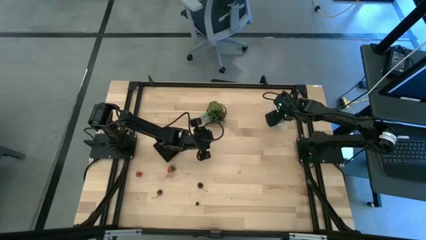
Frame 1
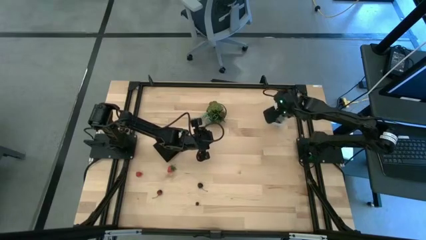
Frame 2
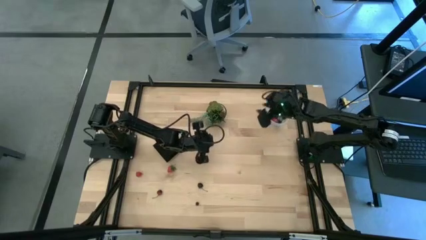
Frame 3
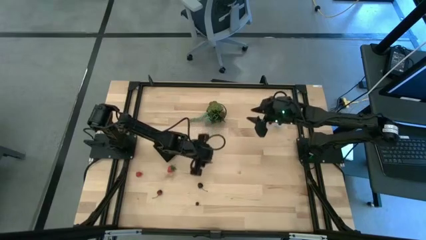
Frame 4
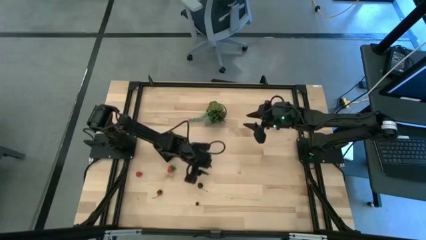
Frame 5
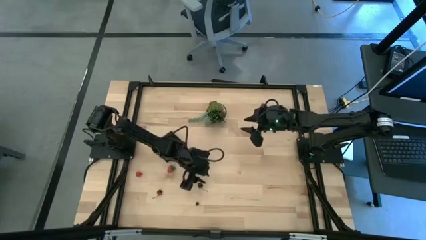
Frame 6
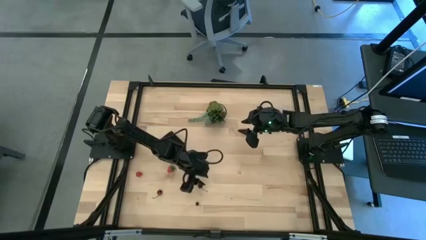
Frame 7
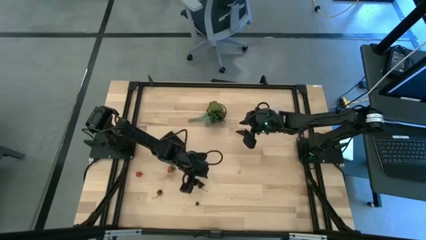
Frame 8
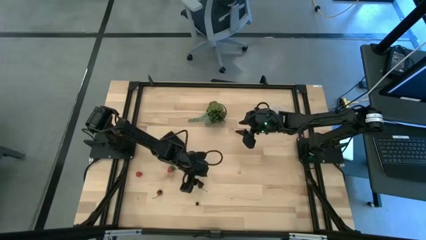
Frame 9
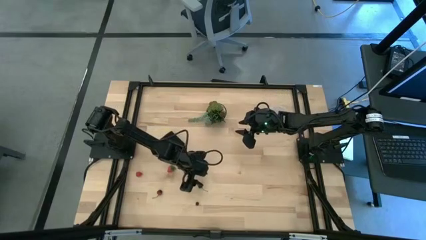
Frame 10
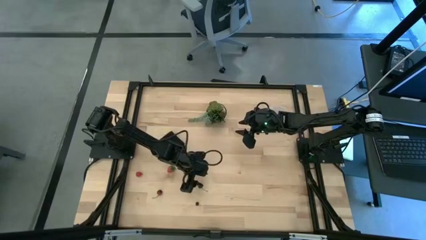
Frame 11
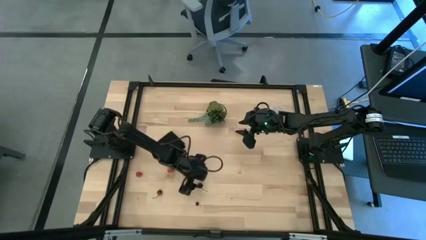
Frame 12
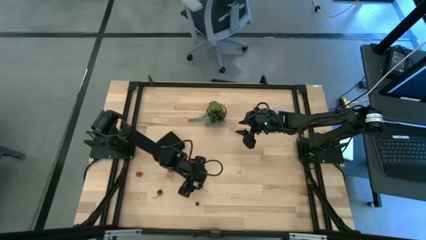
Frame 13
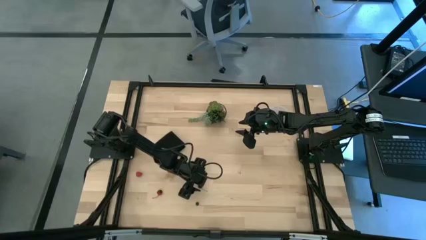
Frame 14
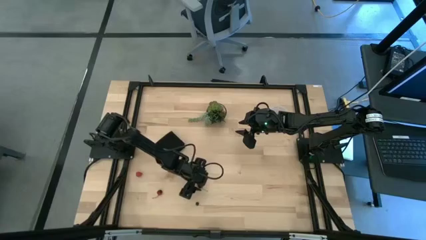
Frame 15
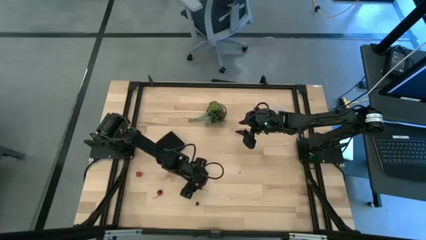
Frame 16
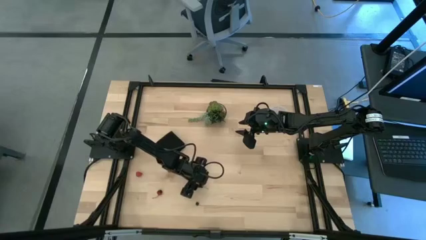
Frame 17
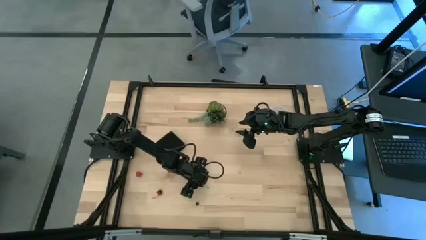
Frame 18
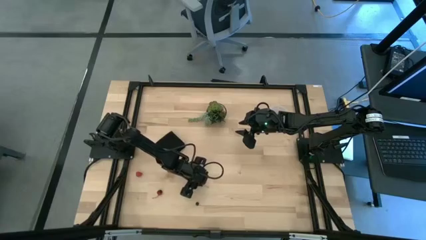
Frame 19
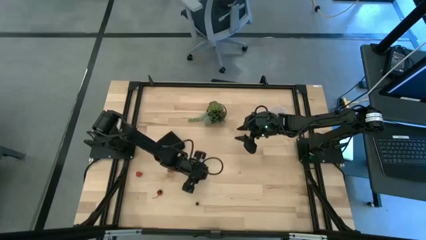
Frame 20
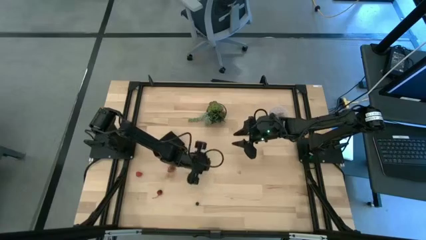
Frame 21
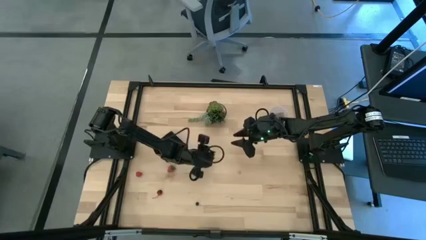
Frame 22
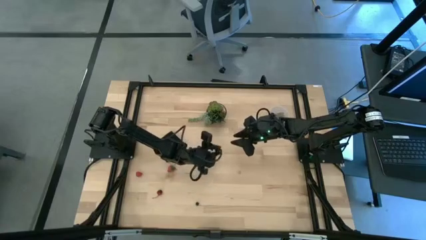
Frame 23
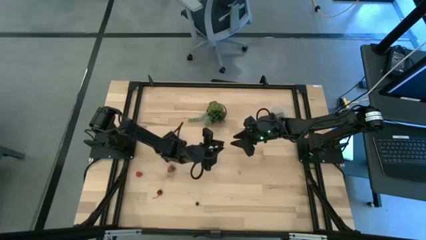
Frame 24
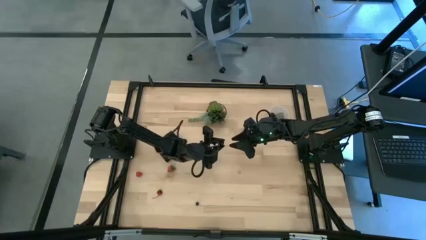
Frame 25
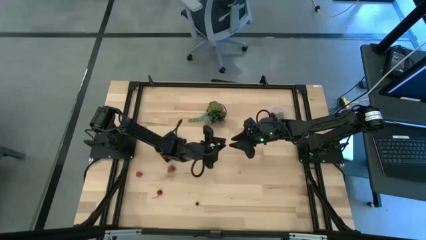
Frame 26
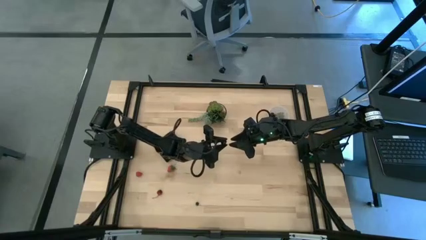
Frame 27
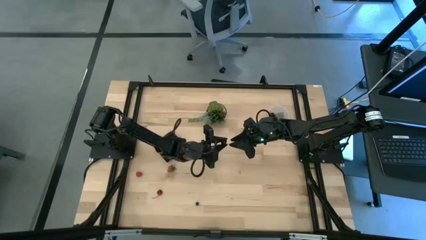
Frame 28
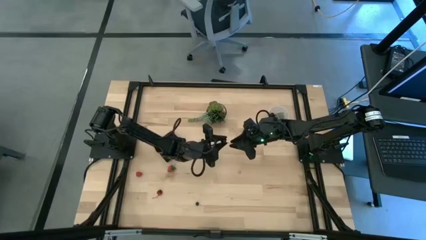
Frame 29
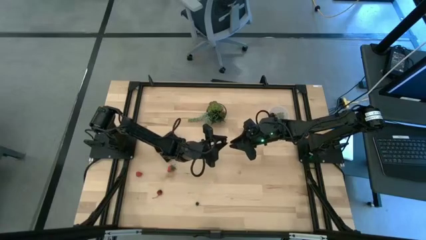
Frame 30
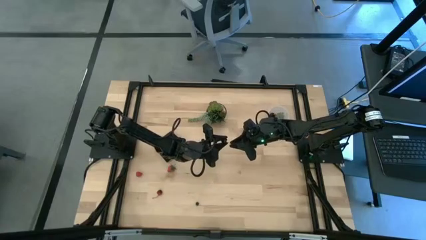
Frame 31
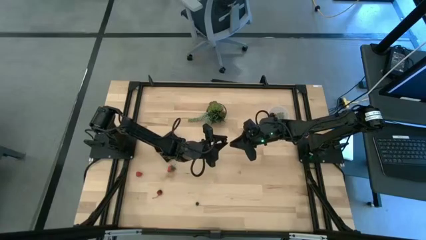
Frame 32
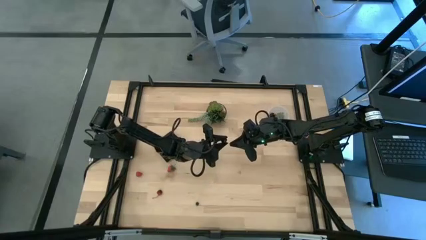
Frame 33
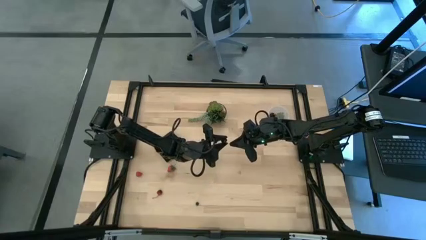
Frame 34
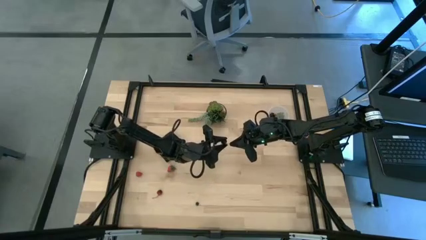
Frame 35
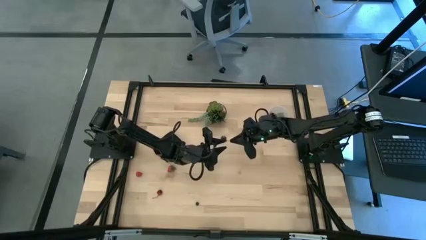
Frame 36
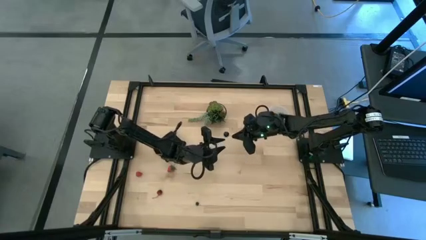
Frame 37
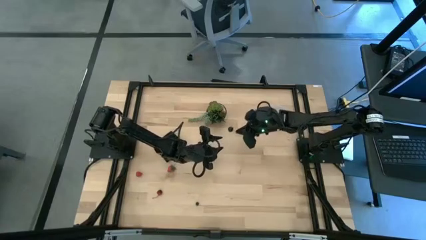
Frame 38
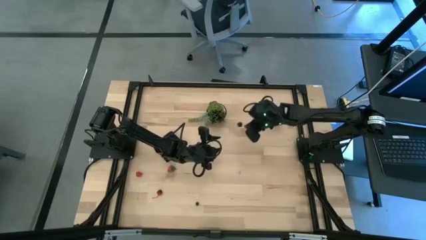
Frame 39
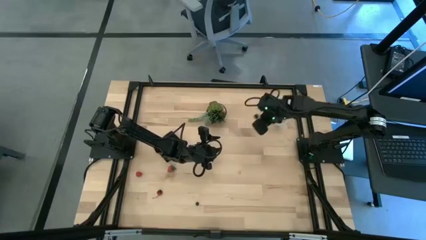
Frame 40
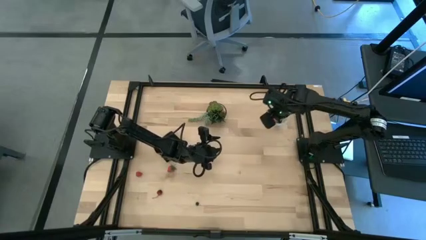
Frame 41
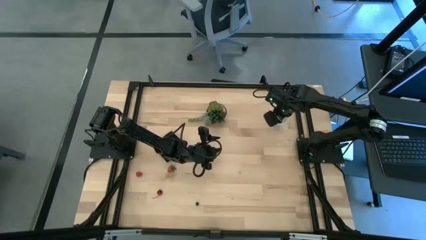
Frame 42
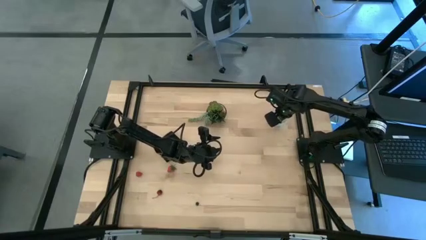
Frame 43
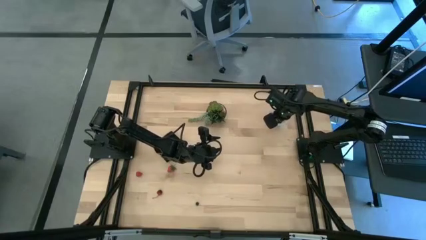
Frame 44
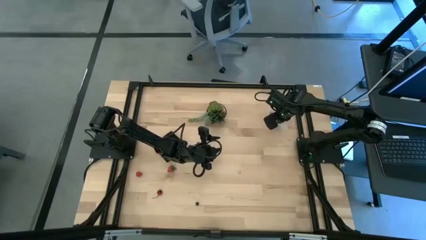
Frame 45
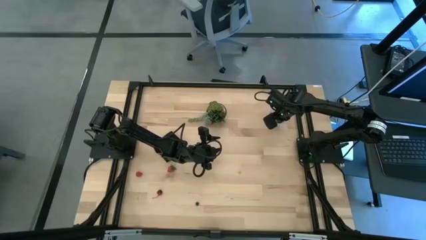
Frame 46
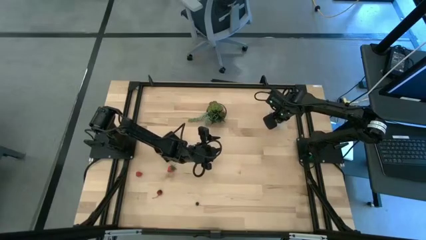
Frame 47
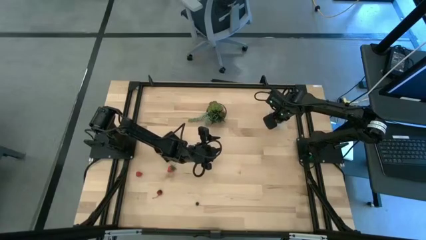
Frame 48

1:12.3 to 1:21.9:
Task: Pick and placing Produce into tupperware
Put the black cherry into the bin

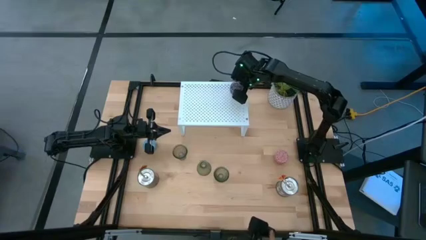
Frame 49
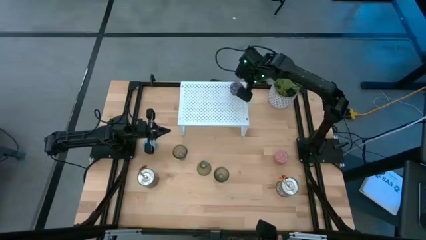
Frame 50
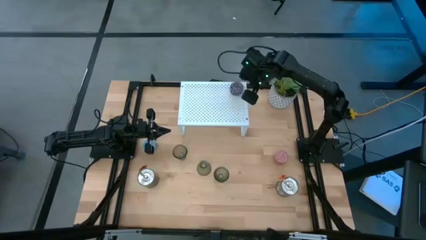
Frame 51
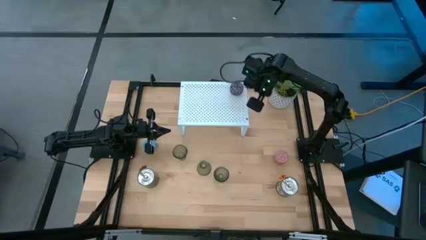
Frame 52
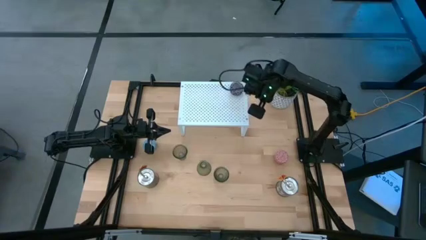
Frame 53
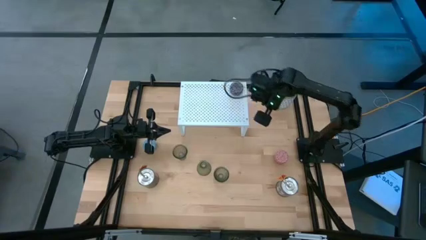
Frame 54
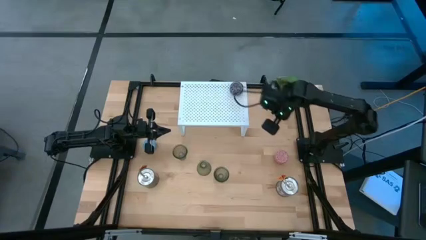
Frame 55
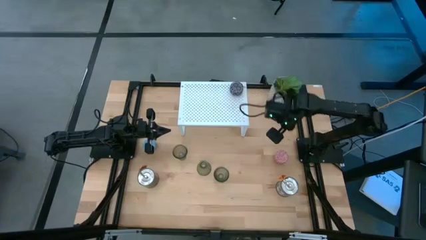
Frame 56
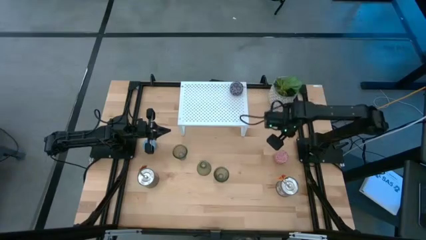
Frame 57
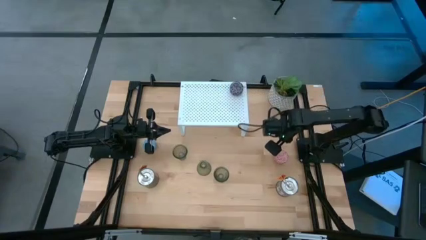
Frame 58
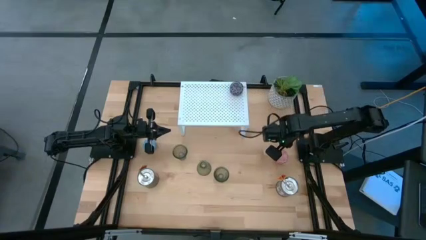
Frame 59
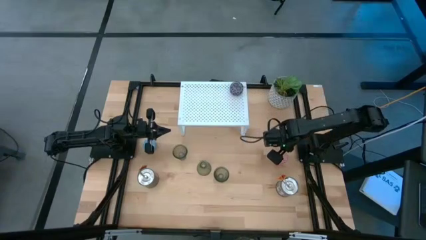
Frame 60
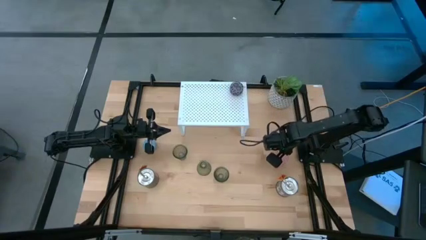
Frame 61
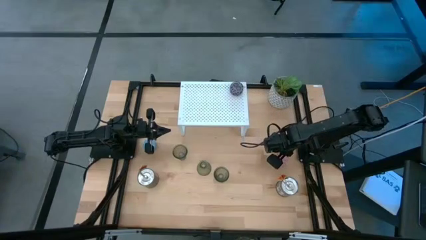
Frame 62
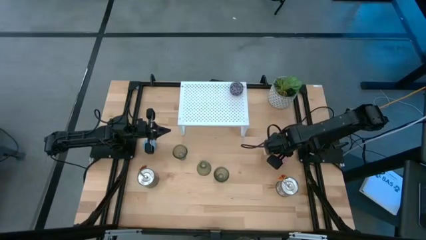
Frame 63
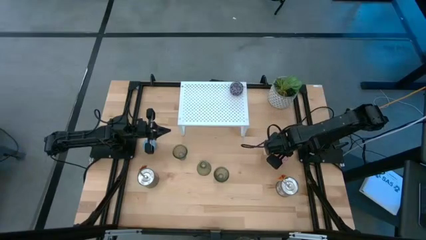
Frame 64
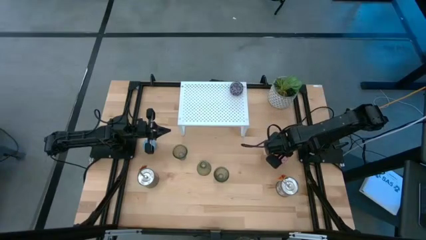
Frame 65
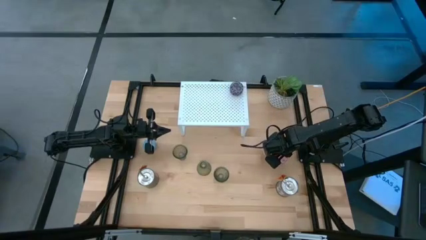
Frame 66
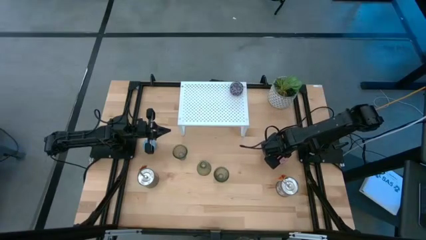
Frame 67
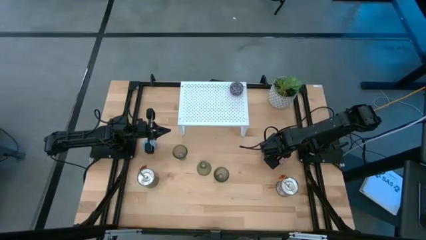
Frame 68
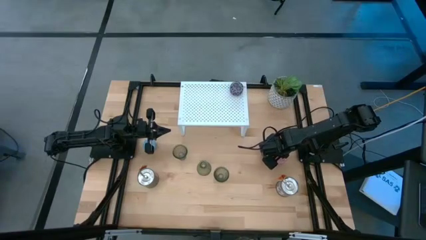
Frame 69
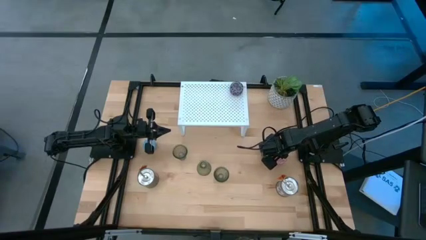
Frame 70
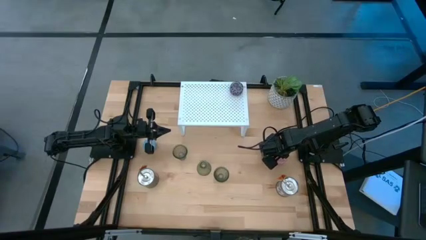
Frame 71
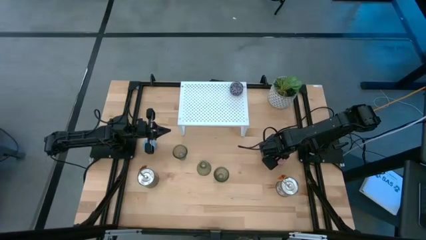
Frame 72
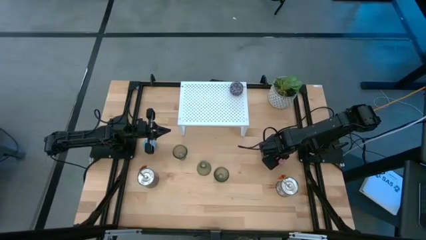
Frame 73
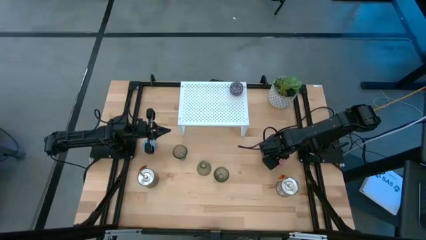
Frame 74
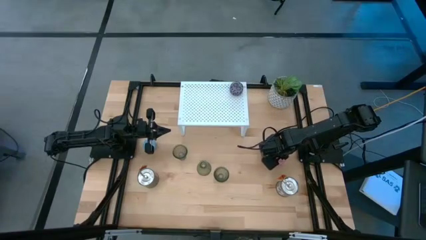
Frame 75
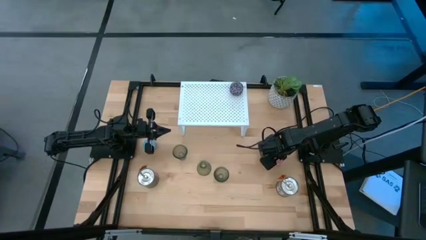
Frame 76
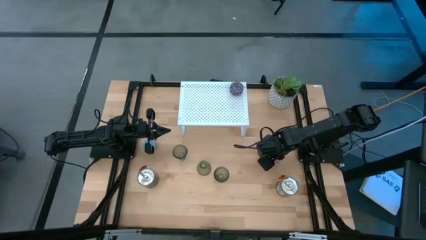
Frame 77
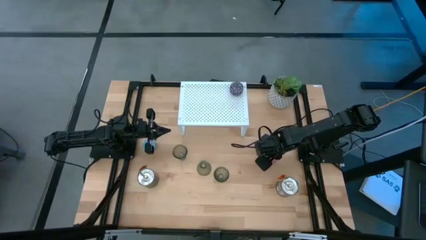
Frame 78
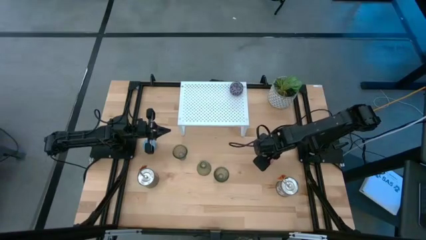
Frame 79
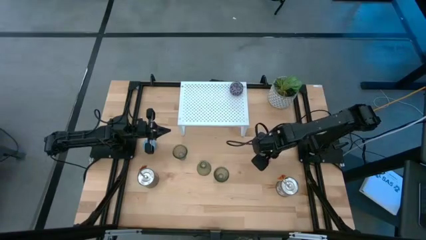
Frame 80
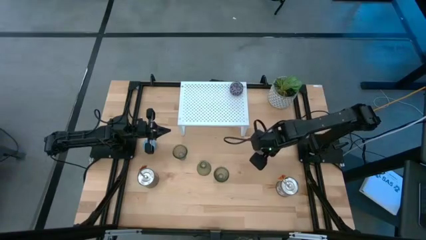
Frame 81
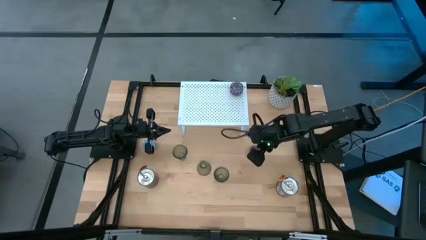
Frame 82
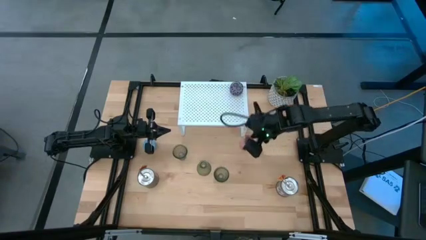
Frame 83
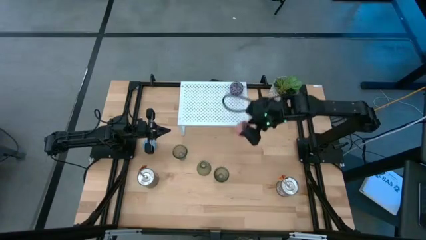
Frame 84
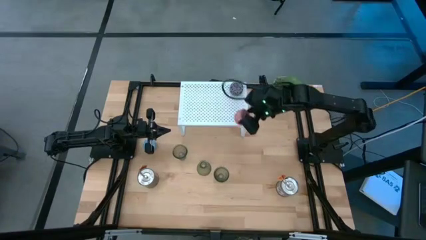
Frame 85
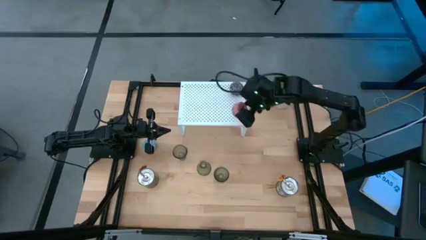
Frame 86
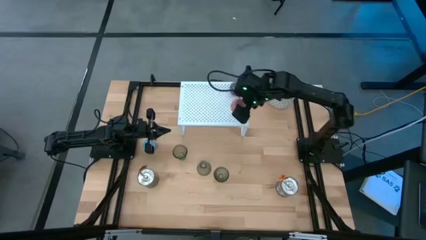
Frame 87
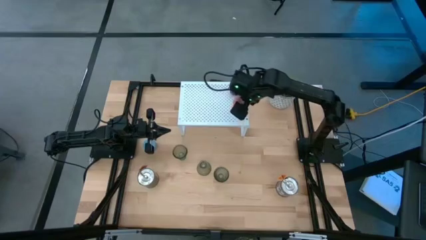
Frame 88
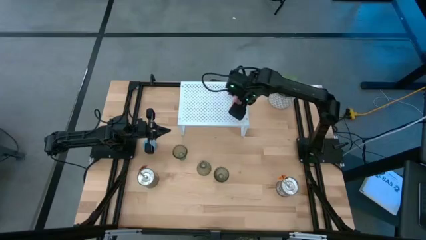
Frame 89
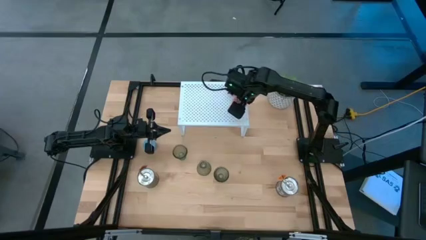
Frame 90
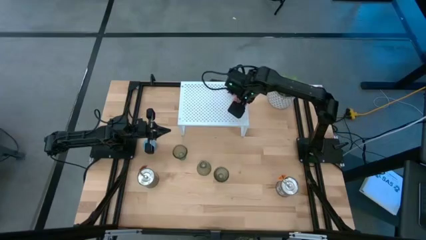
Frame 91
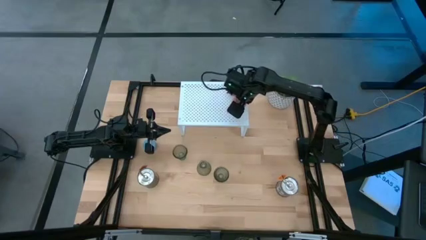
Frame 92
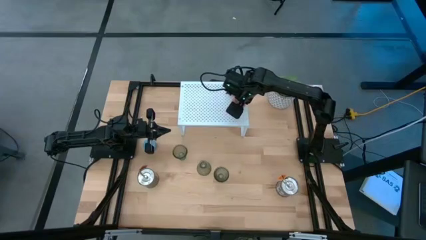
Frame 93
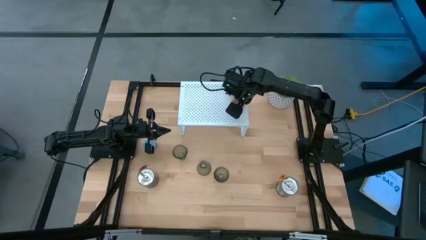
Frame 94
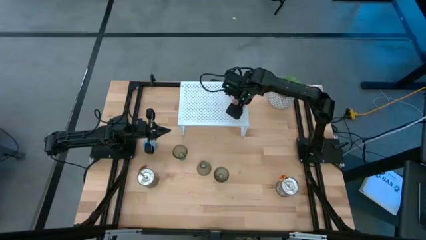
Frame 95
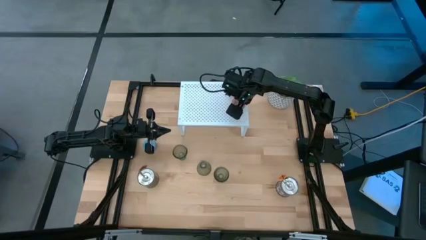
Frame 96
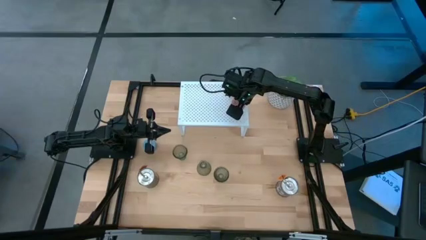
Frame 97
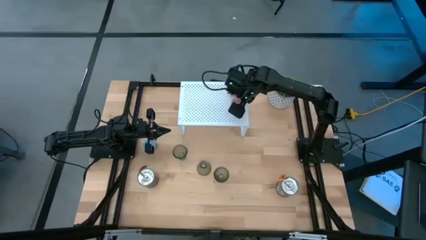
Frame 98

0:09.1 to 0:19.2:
Task: Pick & Place candle stick holders
Put the pink patterned scented candle on the shelf aligned with the other patterned scented candle
